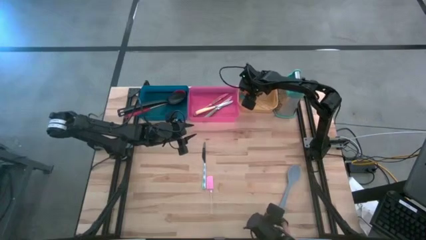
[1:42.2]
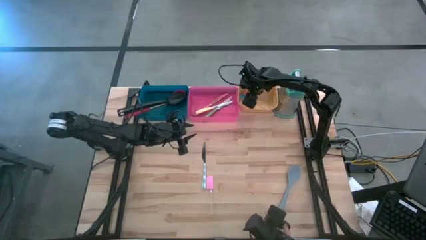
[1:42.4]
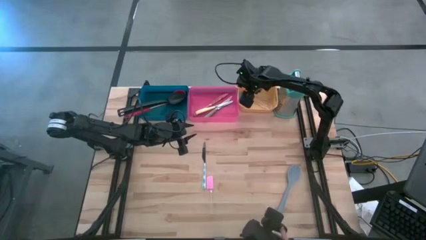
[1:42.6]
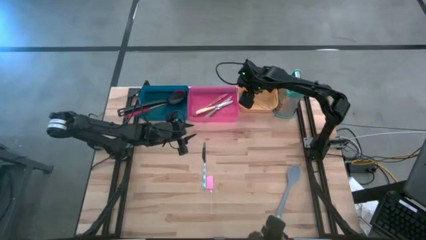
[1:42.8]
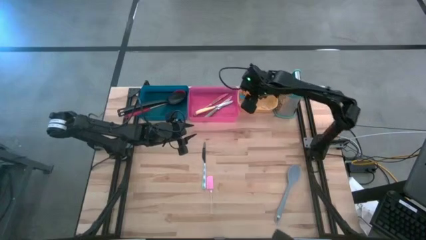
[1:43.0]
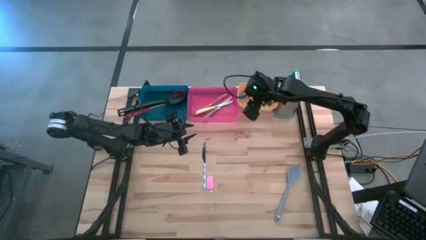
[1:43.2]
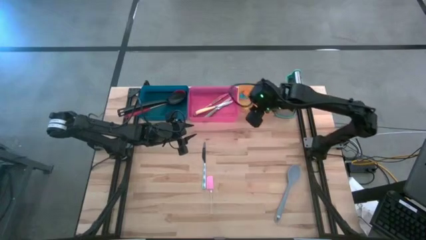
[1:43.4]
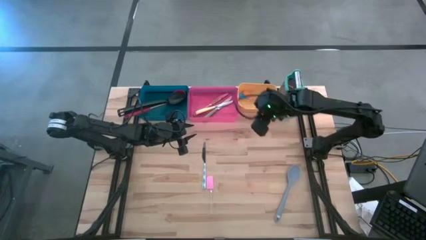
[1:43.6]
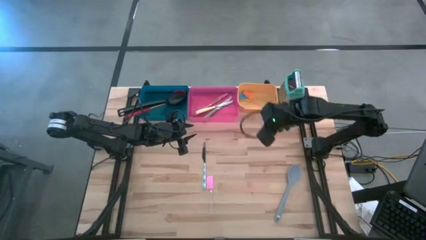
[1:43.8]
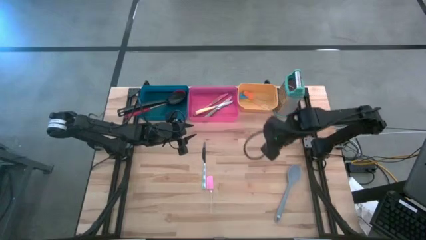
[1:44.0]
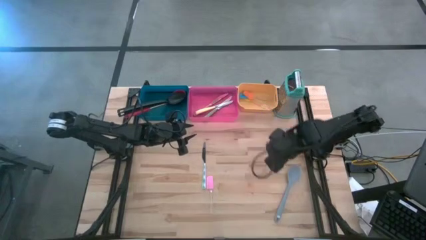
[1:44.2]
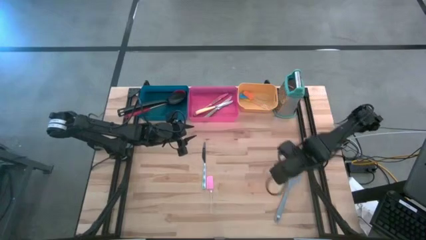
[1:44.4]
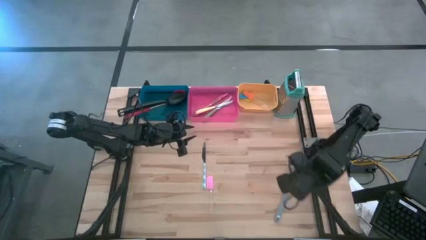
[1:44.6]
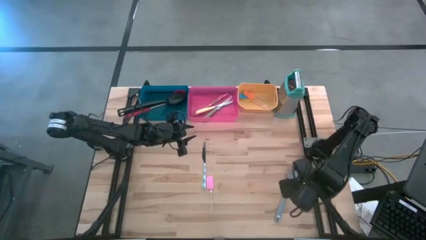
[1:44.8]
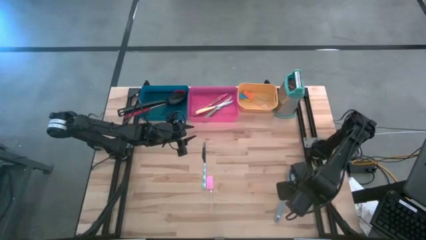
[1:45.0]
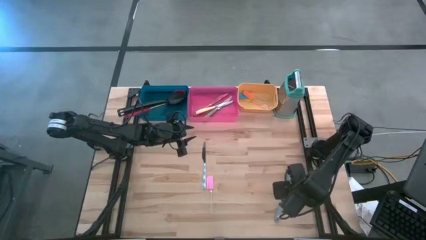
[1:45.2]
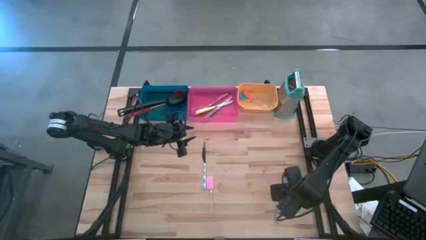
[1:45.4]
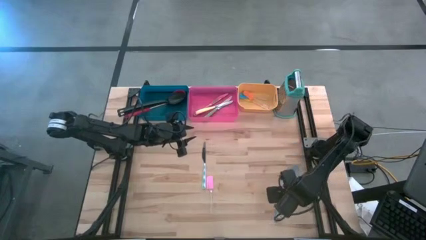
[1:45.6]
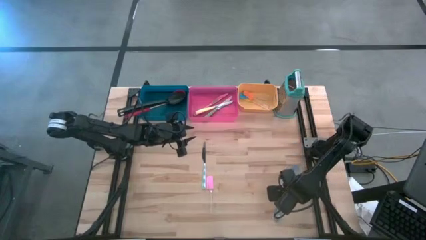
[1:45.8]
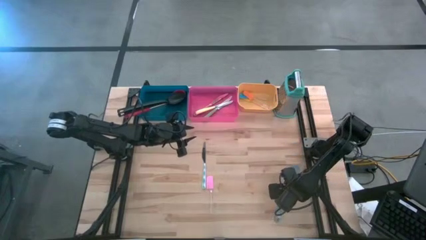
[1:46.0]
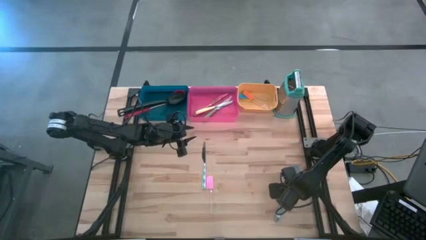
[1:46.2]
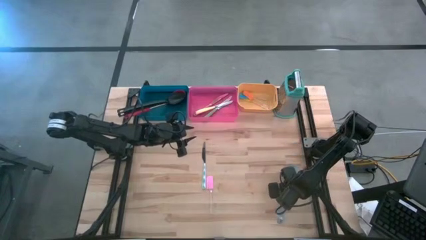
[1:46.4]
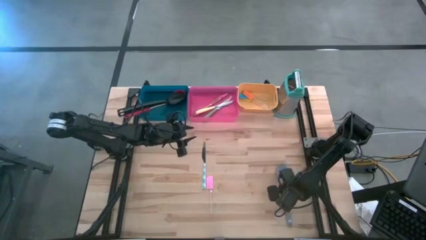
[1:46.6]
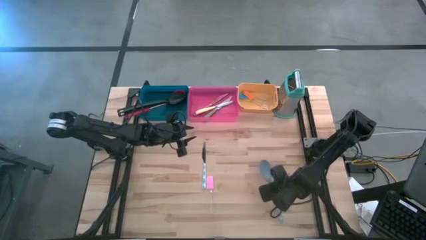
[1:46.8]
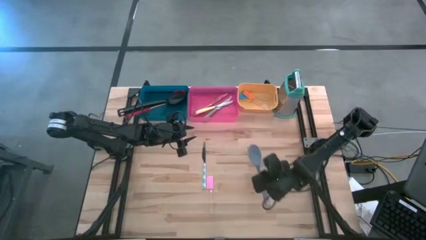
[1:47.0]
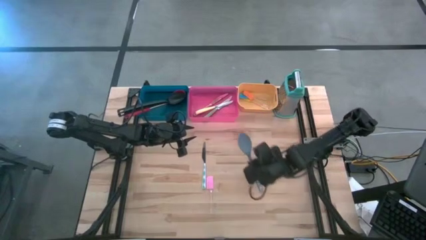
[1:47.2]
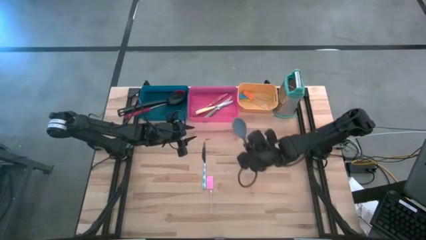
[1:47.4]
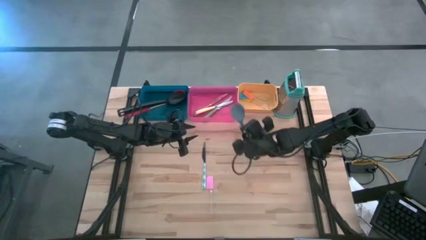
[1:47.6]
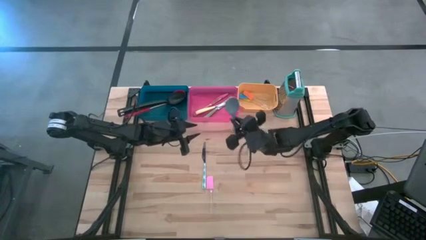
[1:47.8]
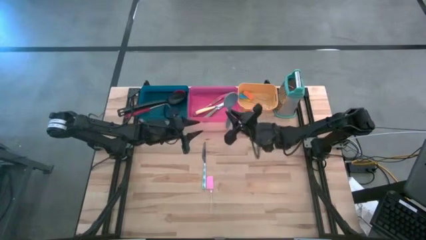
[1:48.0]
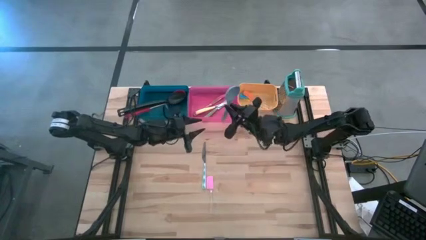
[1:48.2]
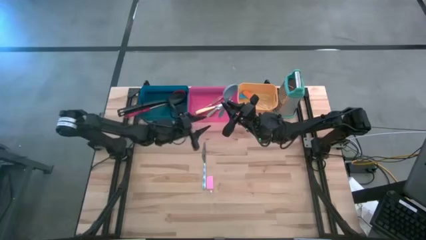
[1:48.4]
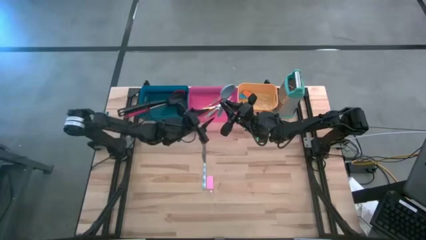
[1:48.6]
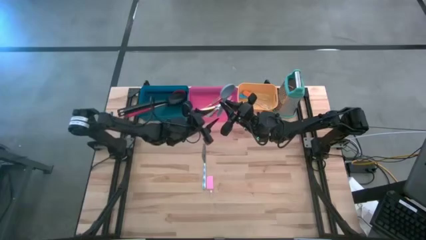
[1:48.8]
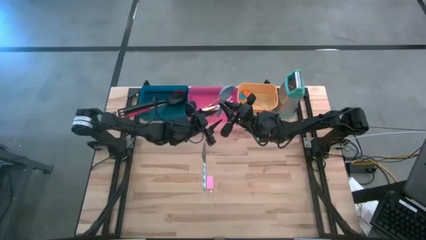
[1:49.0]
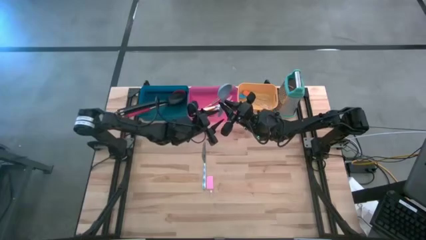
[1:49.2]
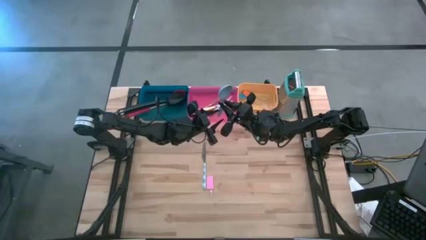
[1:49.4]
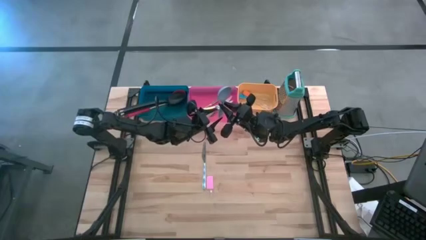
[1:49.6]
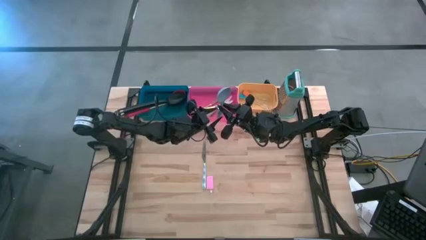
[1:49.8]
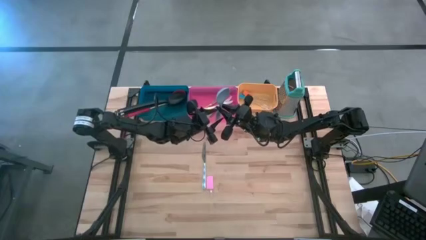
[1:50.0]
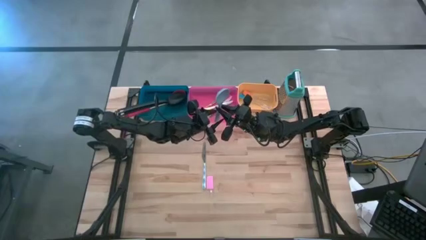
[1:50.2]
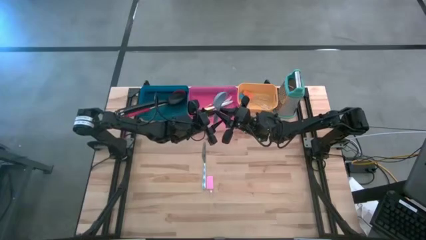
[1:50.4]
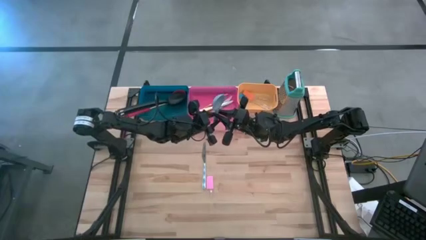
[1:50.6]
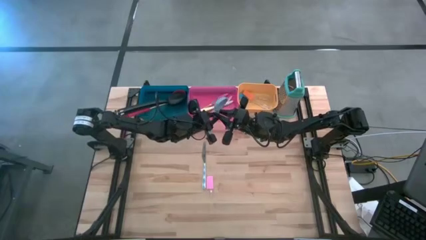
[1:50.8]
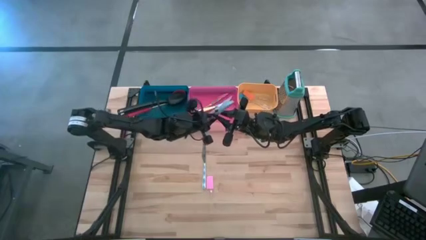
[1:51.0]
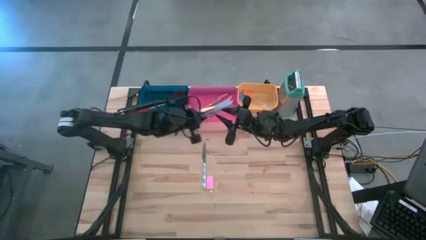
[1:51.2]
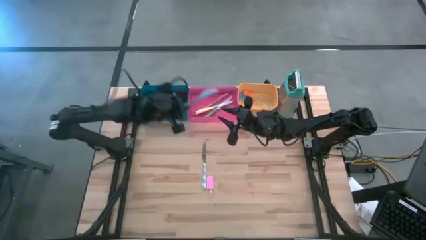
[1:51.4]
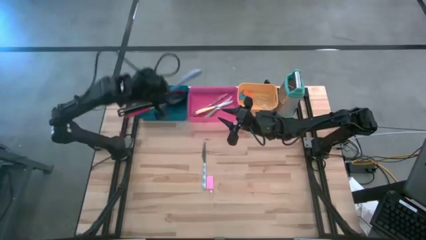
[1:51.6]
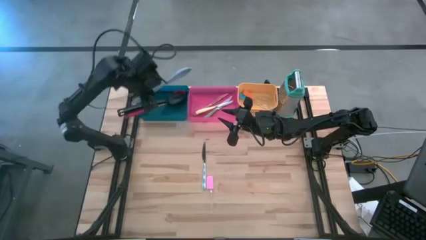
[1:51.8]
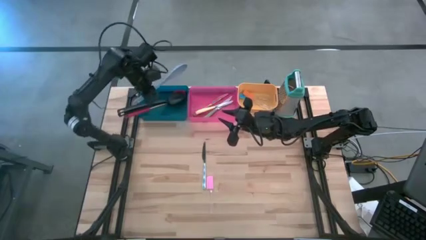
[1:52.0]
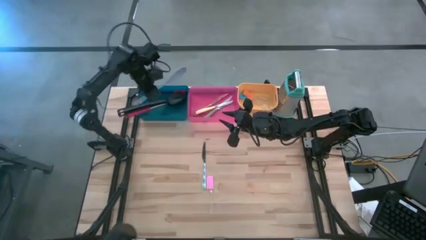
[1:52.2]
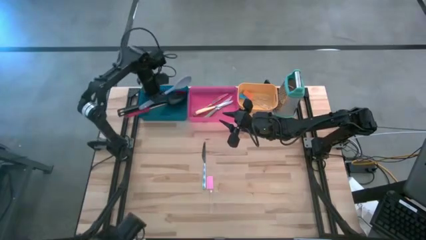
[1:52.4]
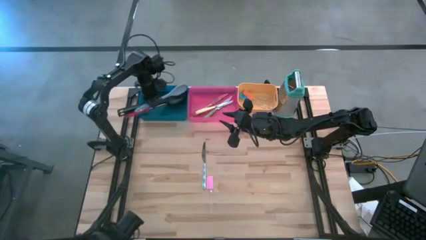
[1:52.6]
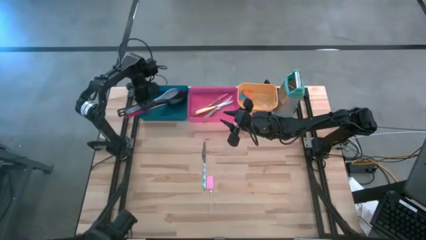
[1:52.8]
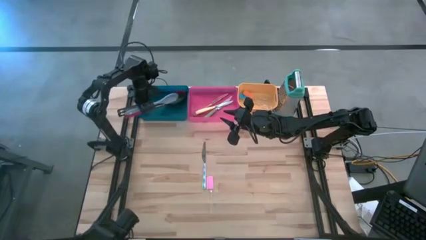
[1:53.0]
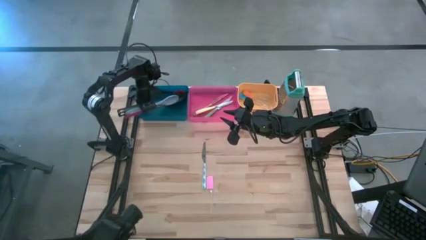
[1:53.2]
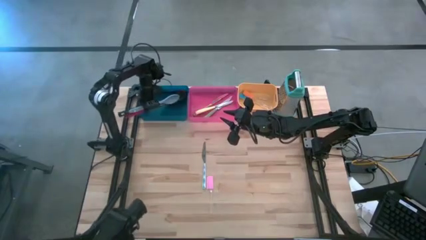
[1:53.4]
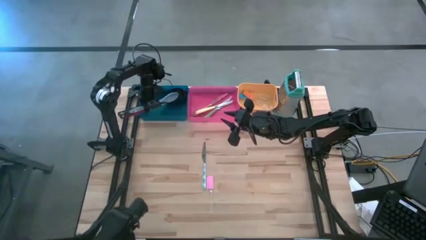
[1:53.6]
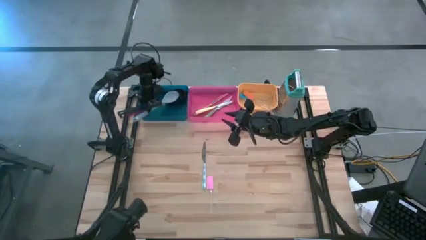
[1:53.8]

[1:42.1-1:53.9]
Task: Pick & Place Kitchen Items
Put the gray serving spoon into the blue bin
